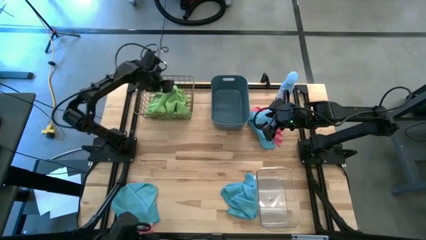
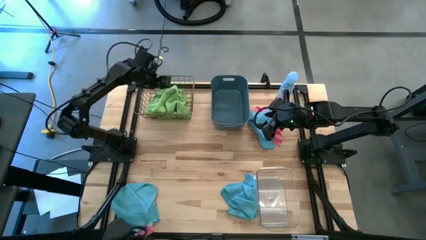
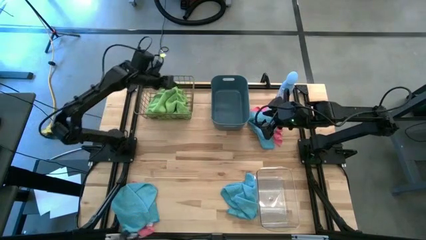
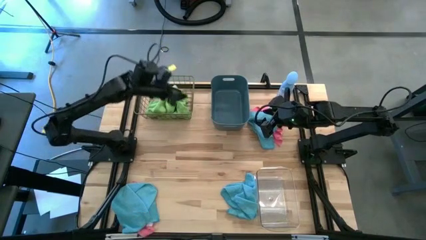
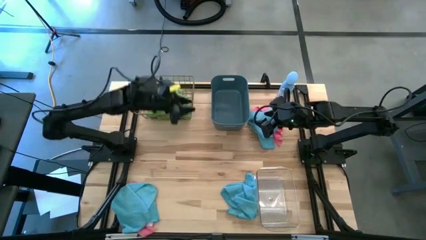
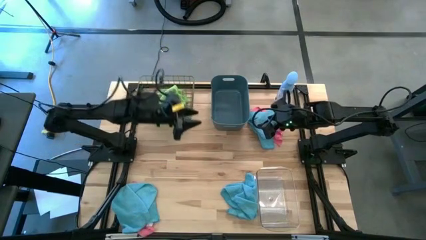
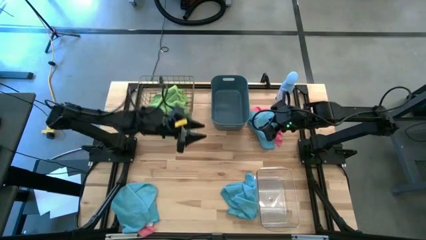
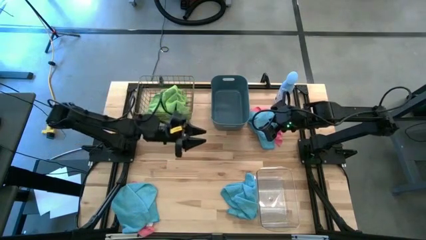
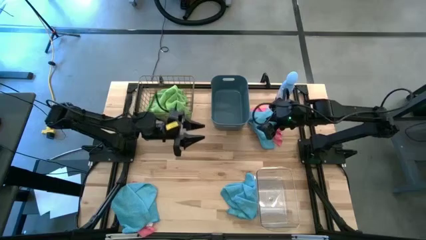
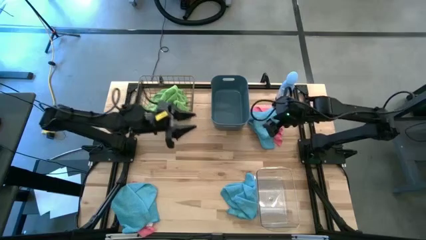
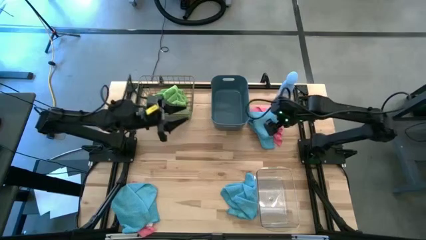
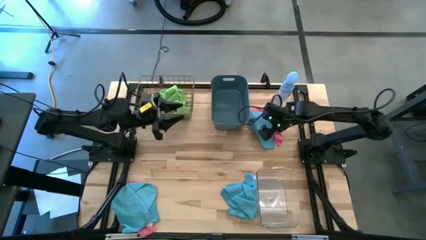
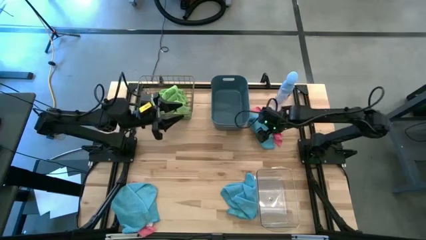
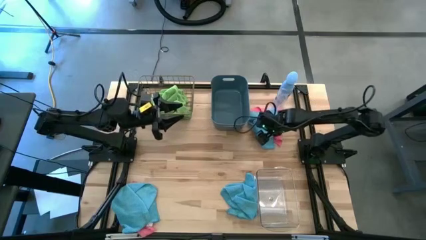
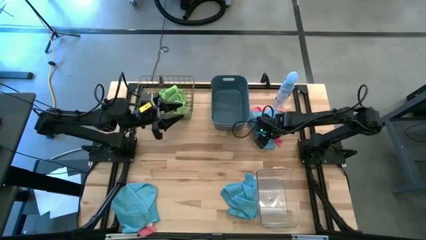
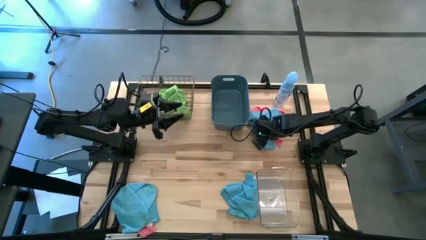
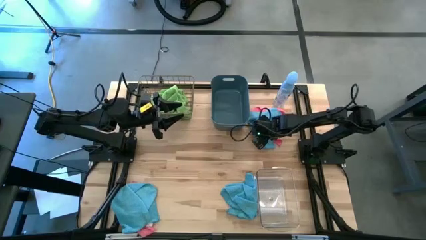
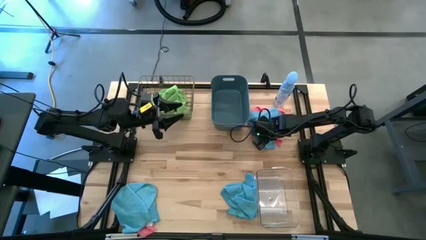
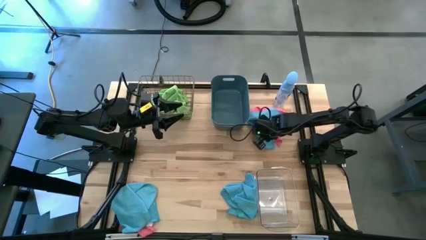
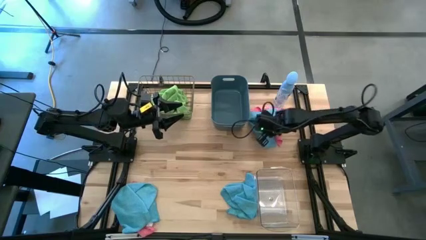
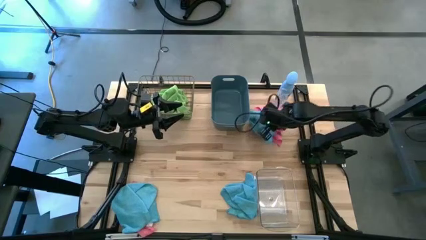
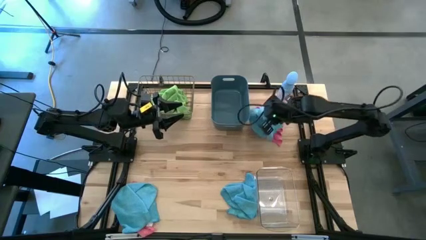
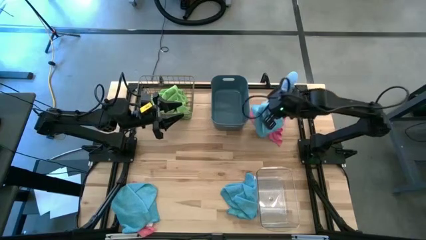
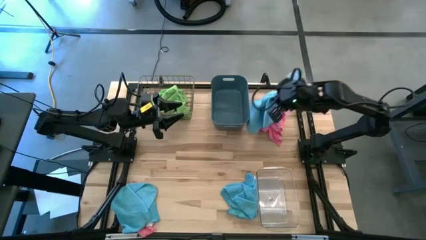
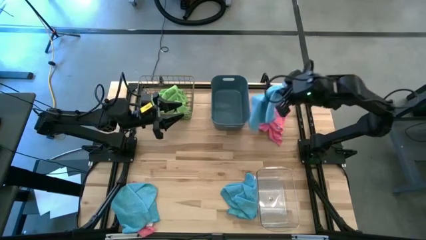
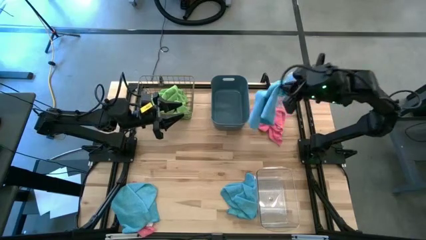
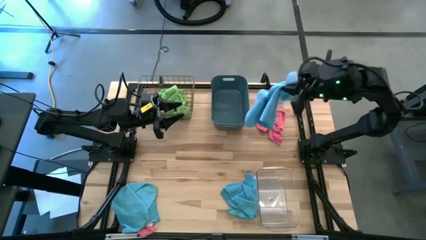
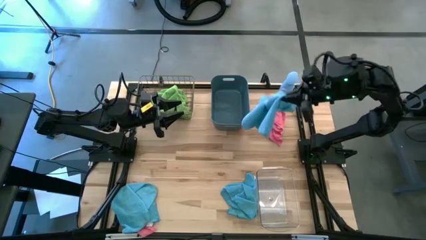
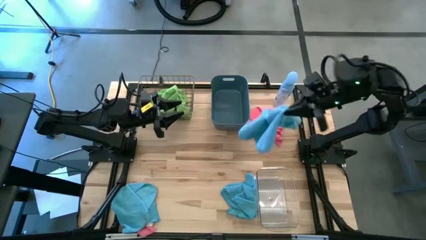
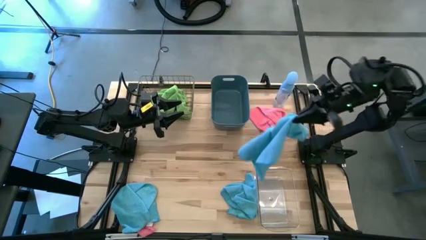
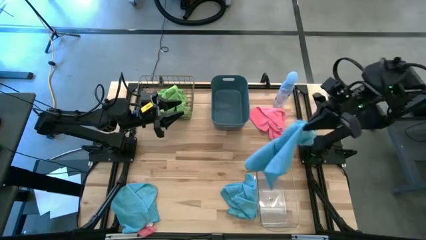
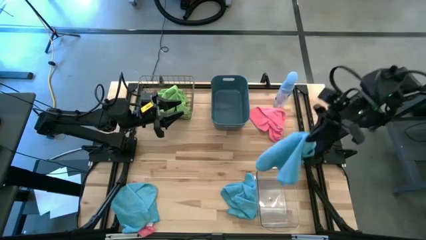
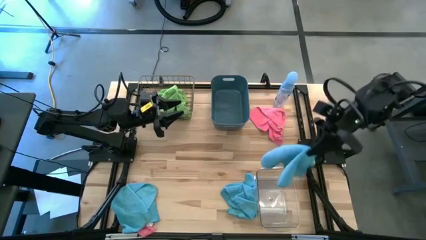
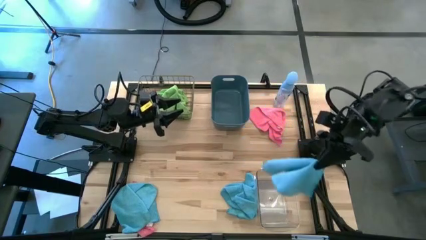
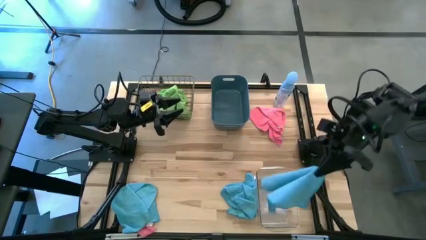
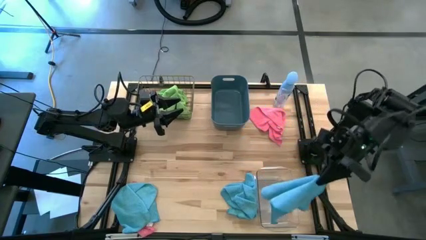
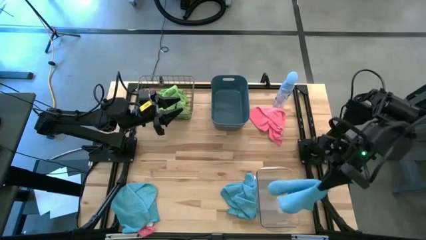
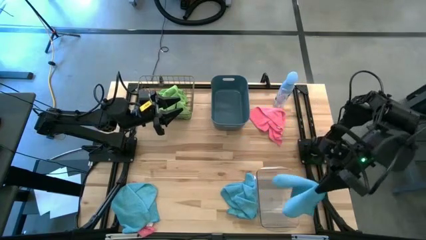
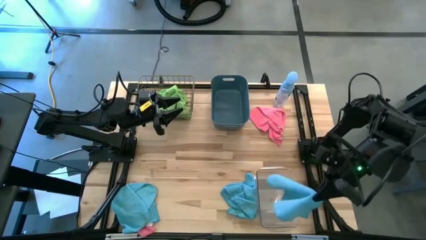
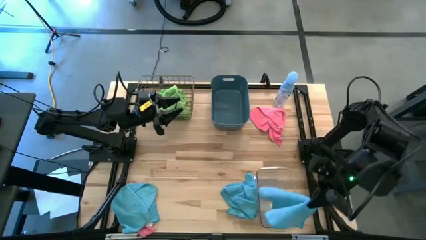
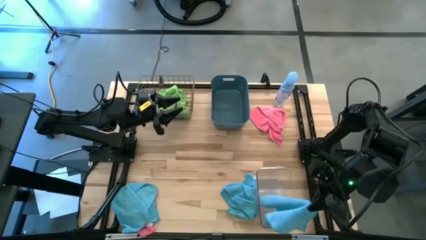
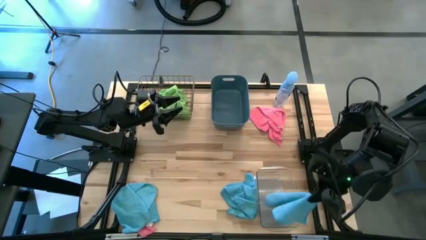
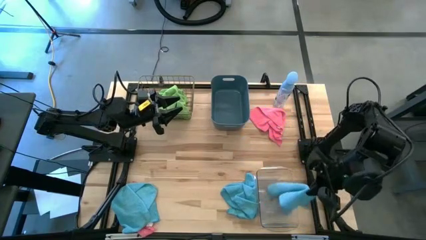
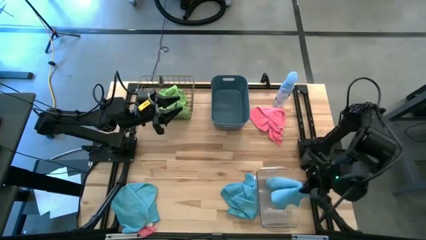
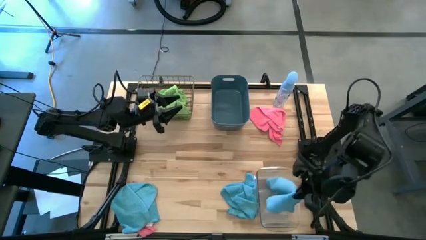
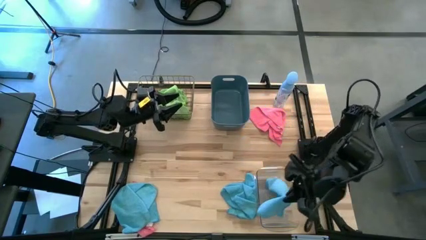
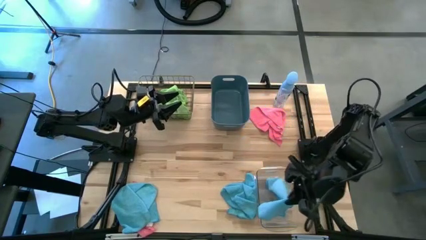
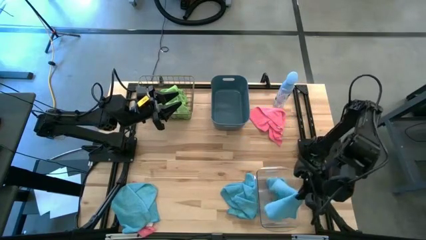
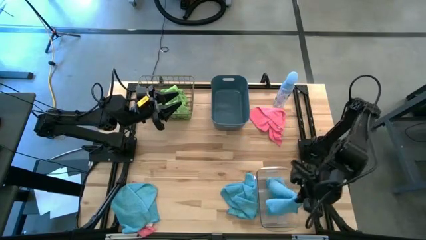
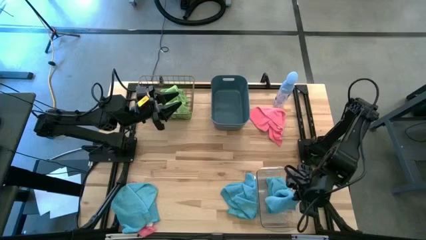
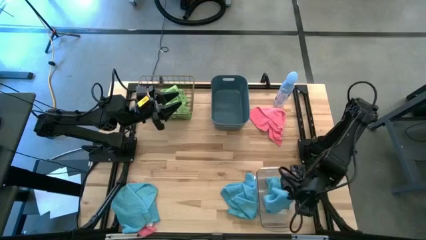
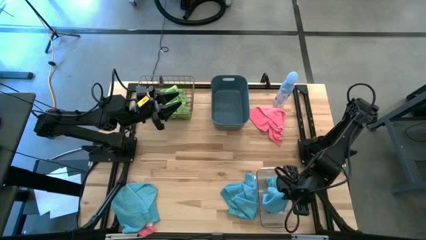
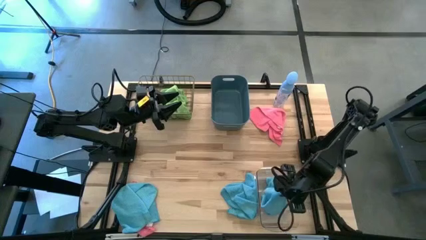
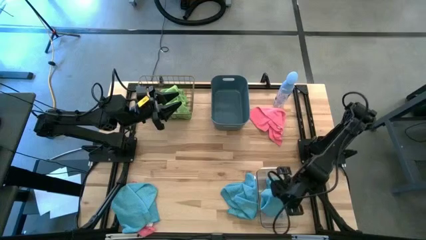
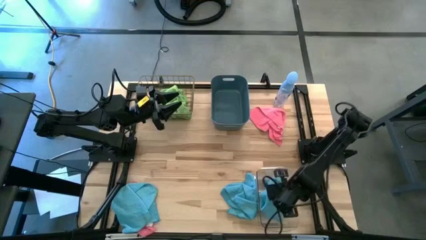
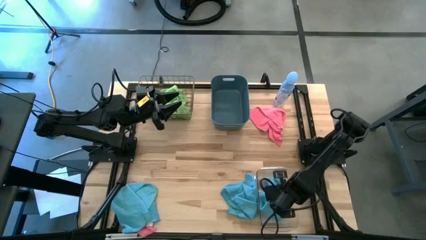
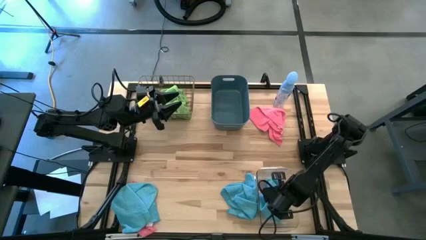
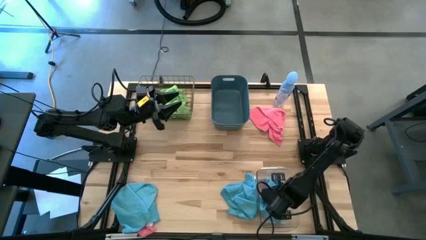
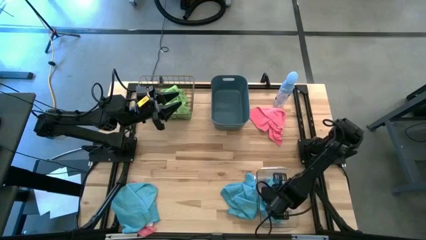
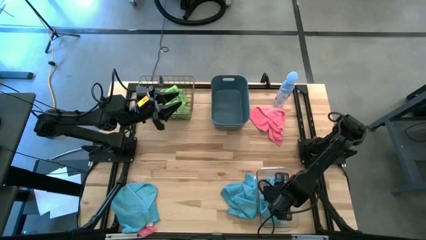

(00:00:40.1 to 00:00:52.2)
Task: Sort microfiber towel by color & place in baskets
Put the top blue towel into the transparent bin

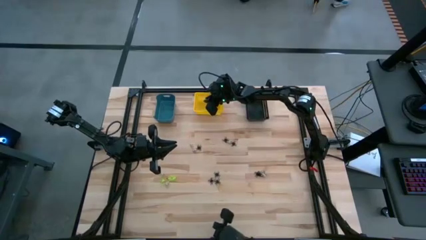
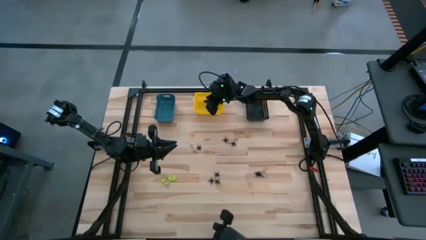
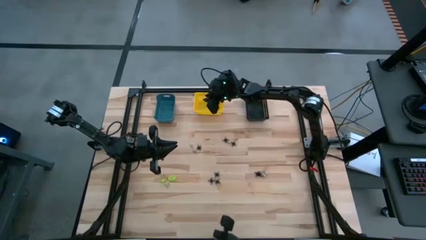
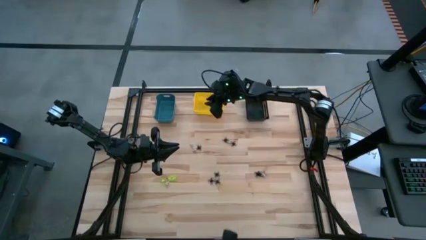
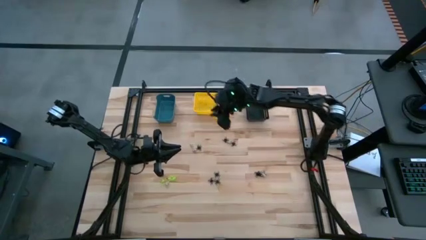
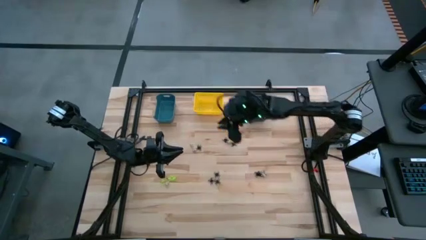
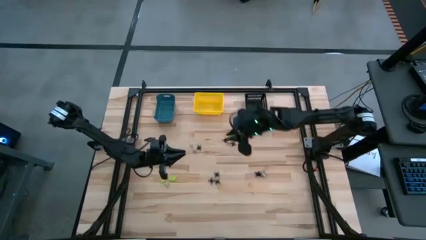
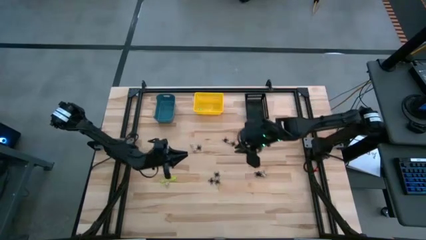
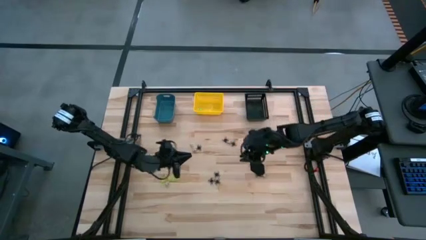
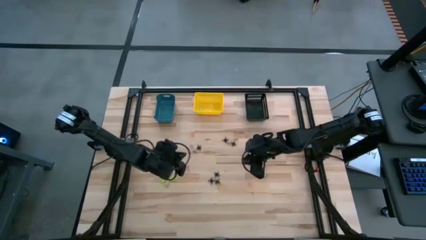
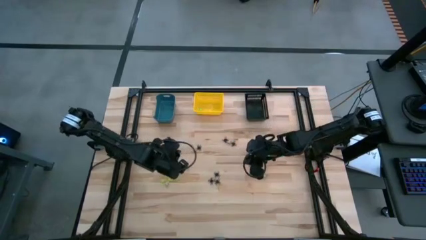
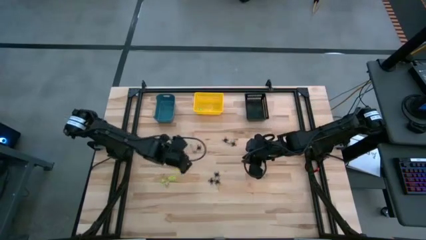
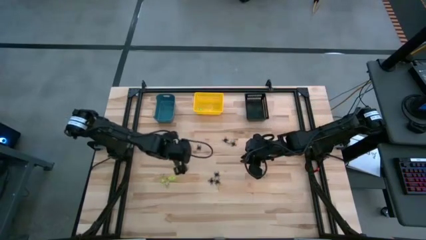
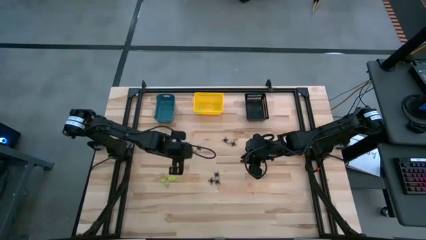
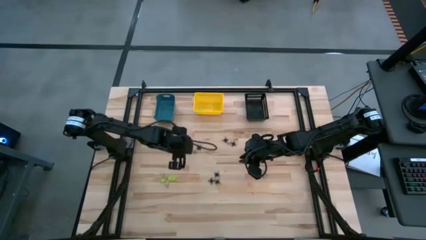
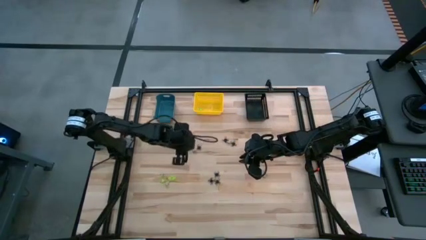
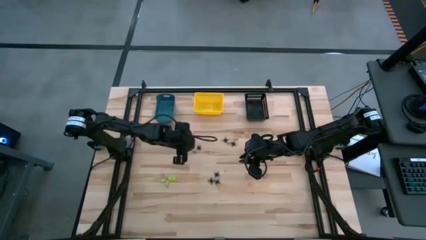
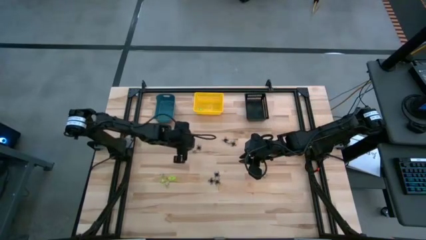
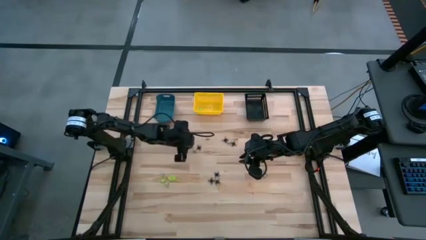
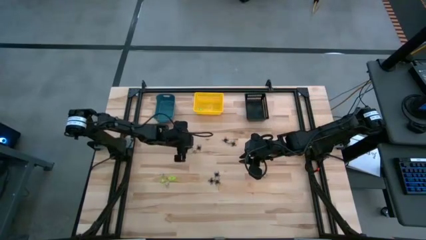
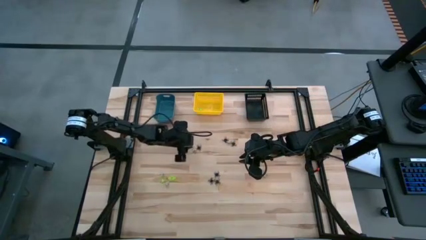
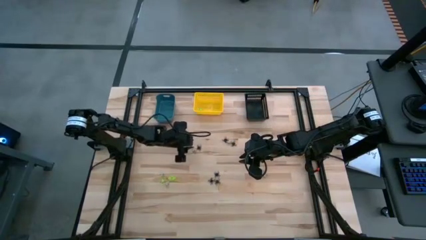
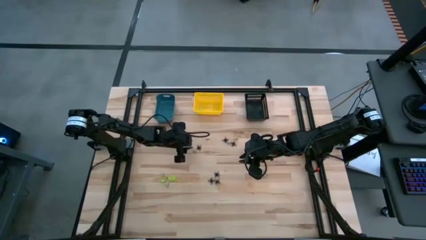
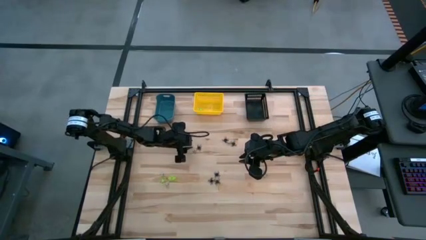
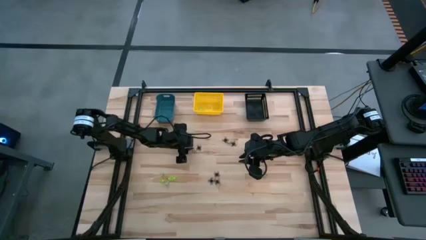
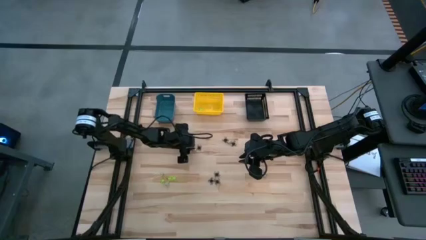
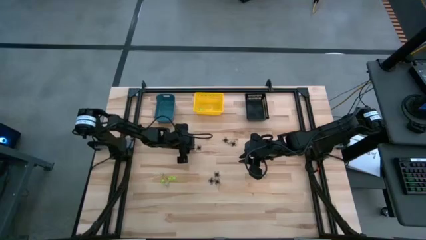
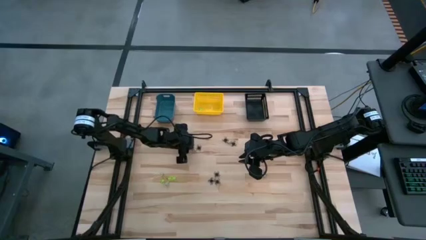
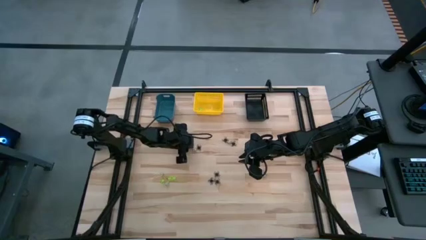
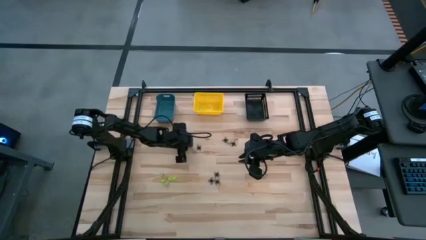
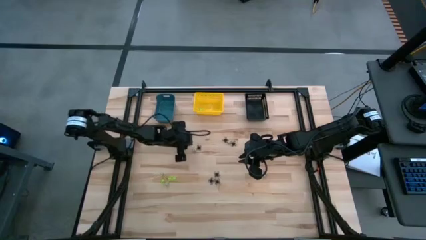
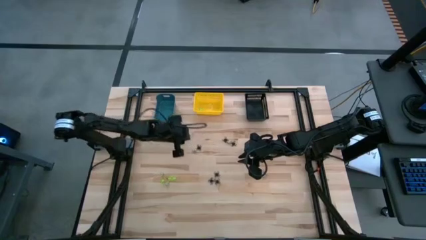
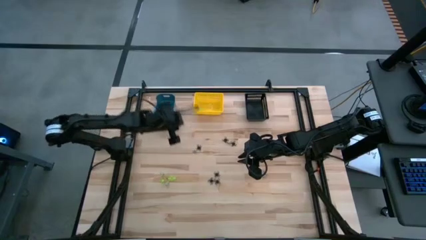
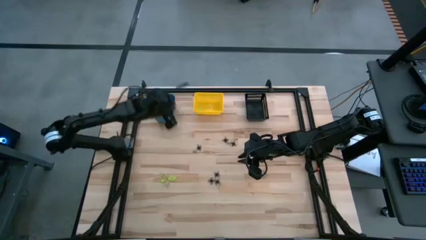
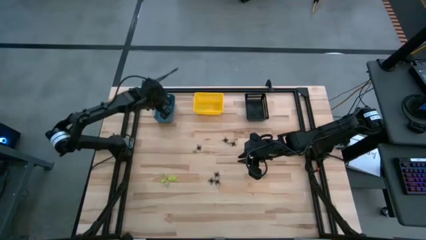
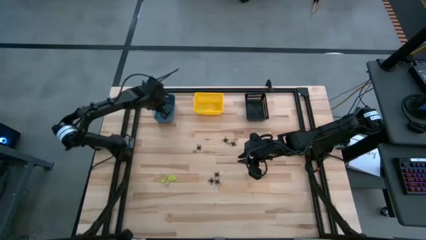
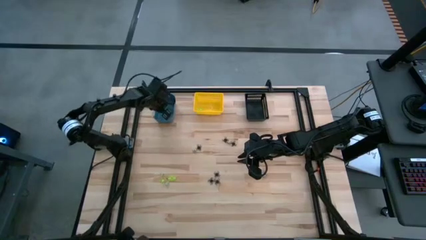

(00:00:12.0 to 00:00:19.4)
Task: Sort Halloween decoration
Put the gray skull toy into the blue bin
